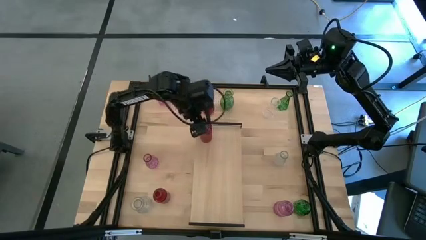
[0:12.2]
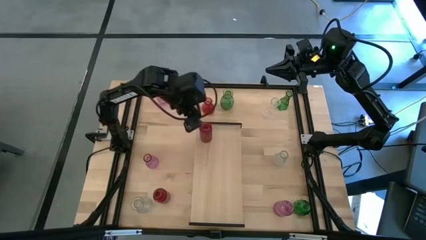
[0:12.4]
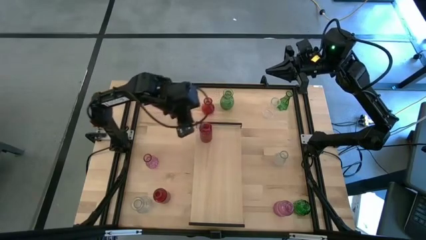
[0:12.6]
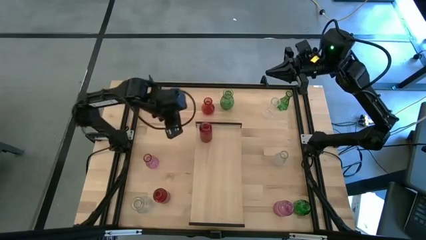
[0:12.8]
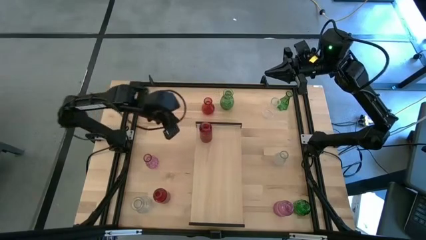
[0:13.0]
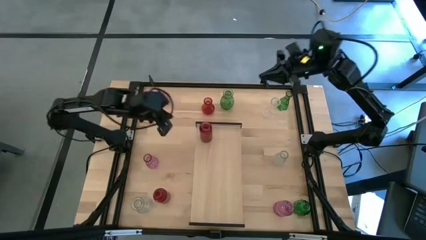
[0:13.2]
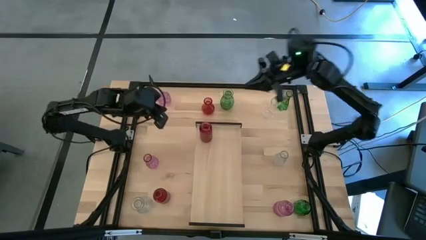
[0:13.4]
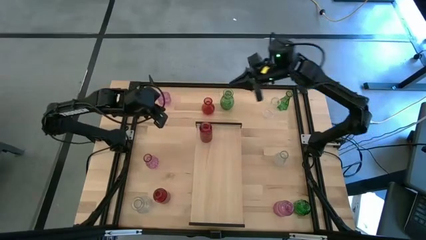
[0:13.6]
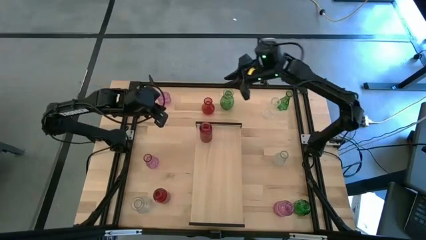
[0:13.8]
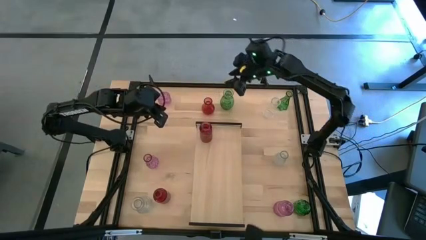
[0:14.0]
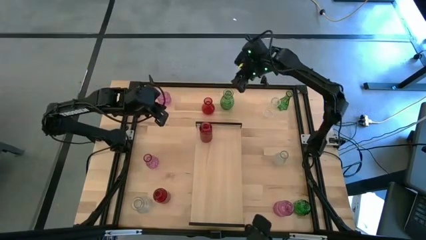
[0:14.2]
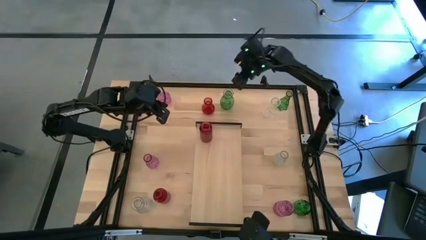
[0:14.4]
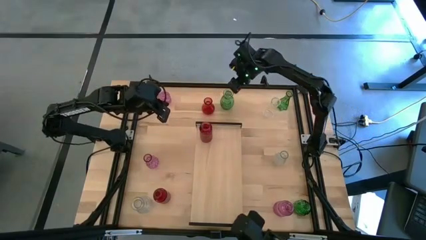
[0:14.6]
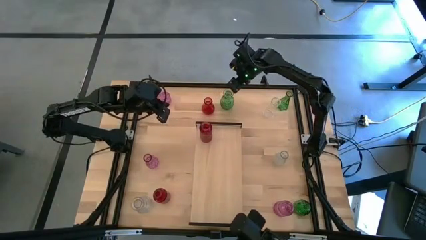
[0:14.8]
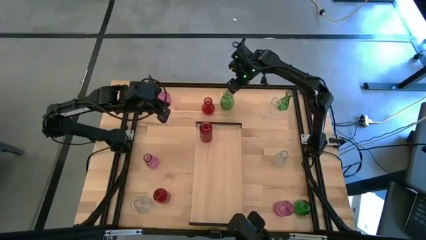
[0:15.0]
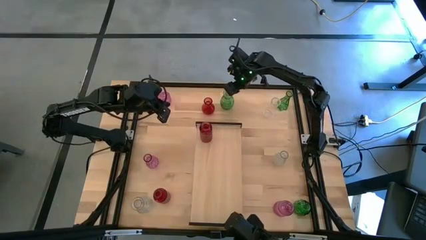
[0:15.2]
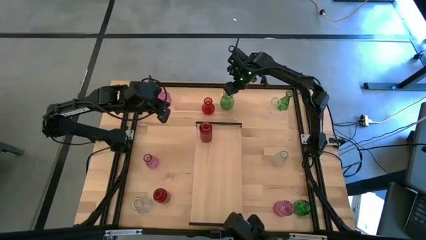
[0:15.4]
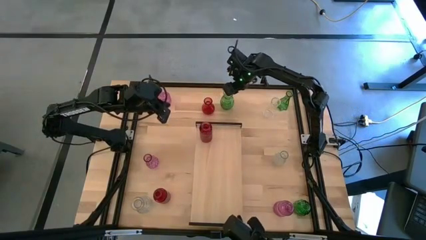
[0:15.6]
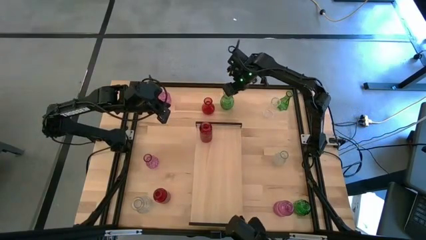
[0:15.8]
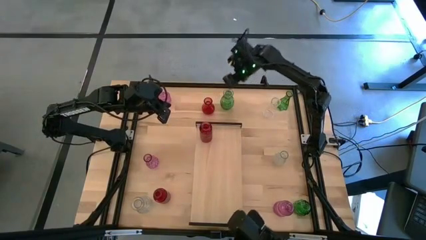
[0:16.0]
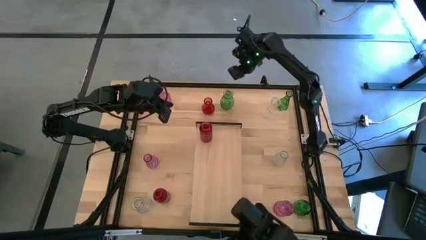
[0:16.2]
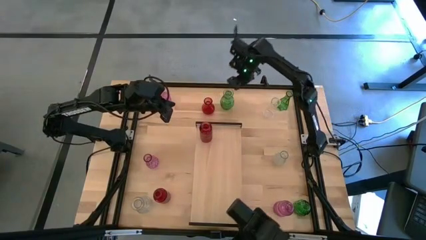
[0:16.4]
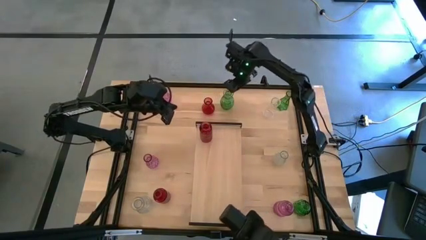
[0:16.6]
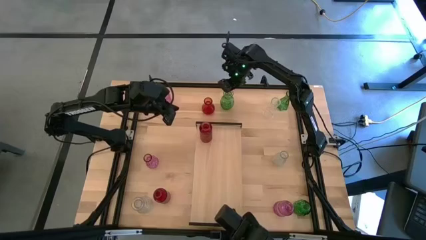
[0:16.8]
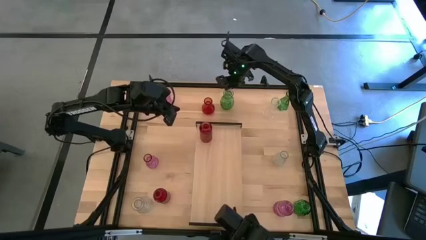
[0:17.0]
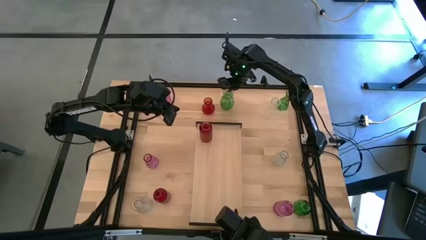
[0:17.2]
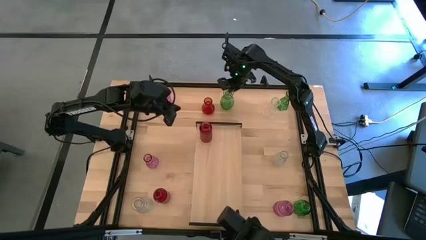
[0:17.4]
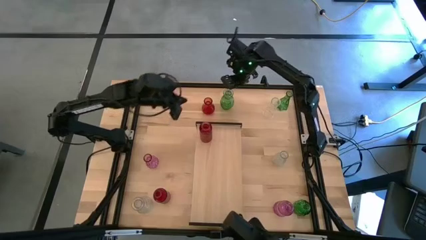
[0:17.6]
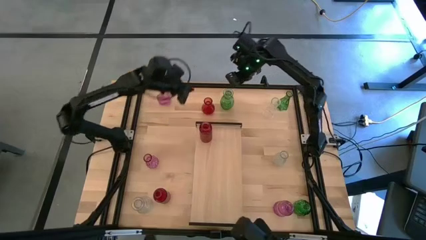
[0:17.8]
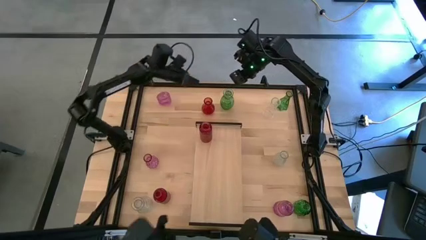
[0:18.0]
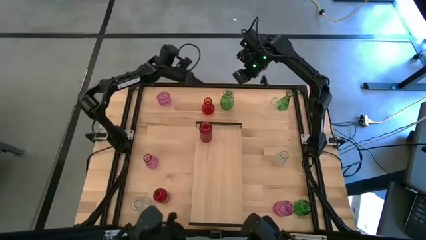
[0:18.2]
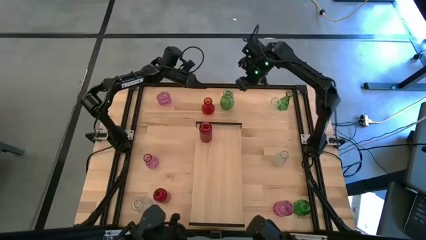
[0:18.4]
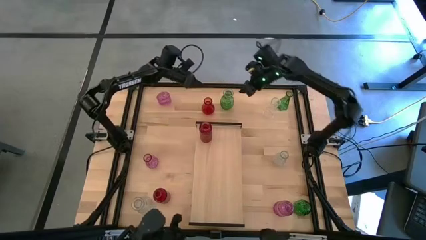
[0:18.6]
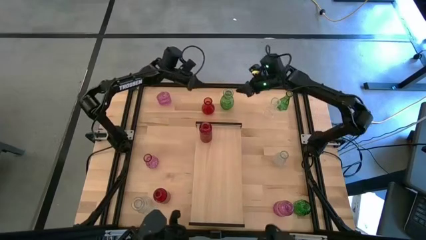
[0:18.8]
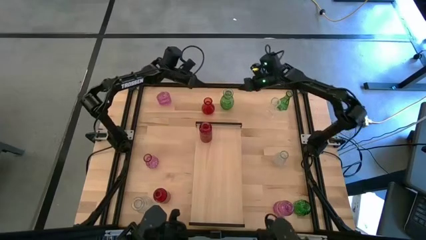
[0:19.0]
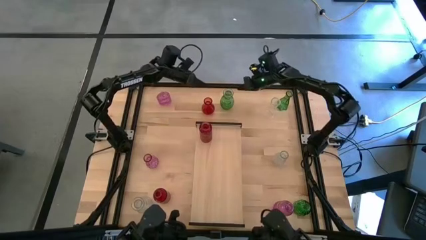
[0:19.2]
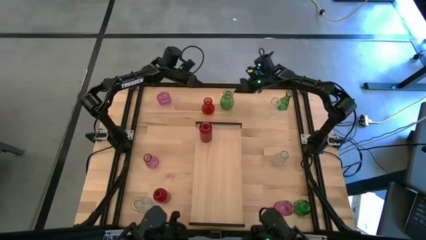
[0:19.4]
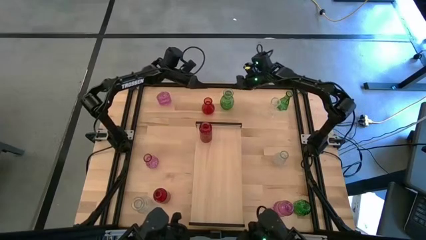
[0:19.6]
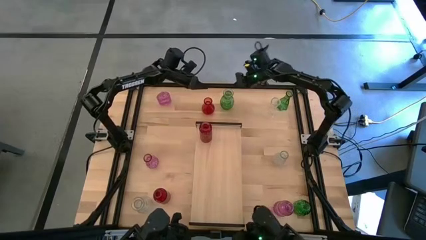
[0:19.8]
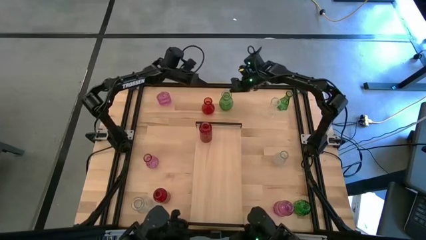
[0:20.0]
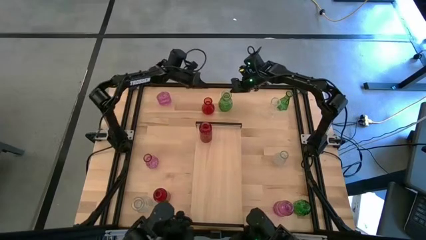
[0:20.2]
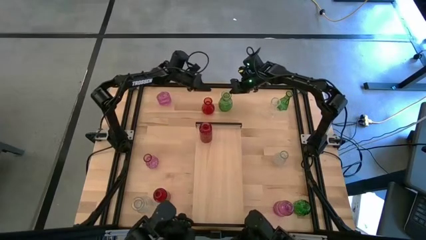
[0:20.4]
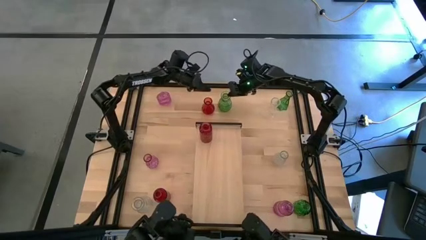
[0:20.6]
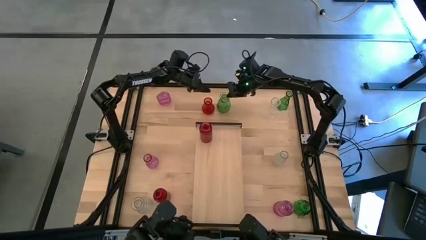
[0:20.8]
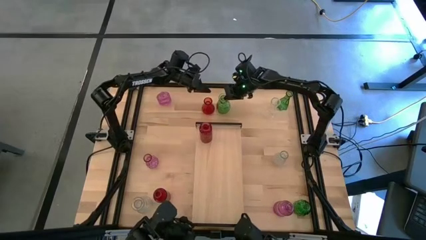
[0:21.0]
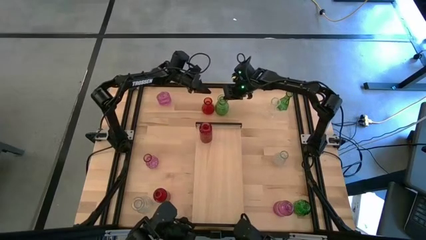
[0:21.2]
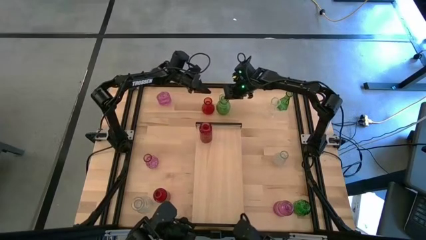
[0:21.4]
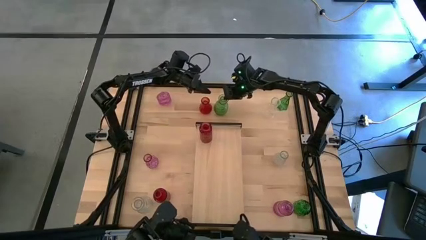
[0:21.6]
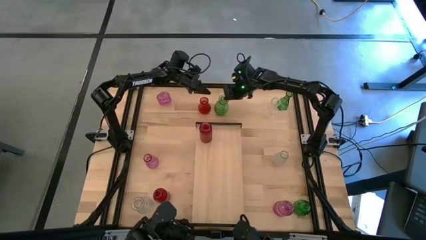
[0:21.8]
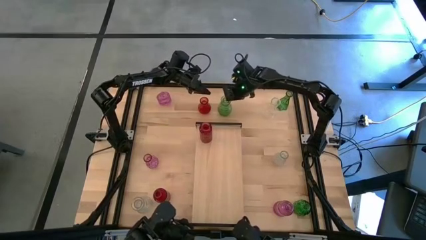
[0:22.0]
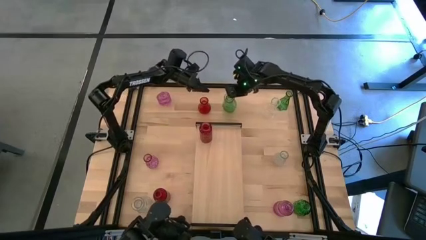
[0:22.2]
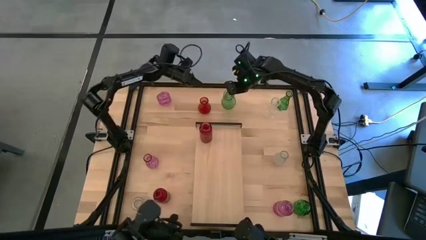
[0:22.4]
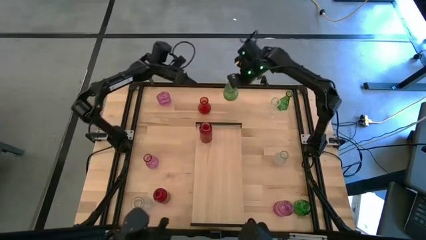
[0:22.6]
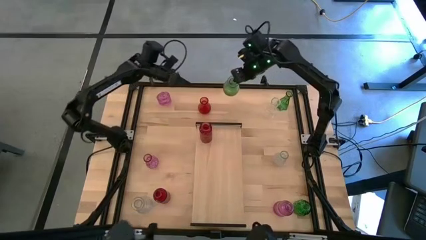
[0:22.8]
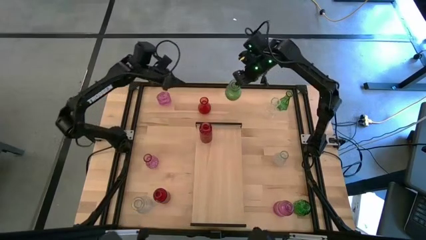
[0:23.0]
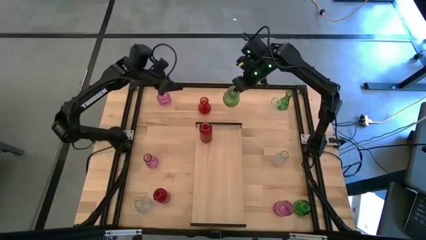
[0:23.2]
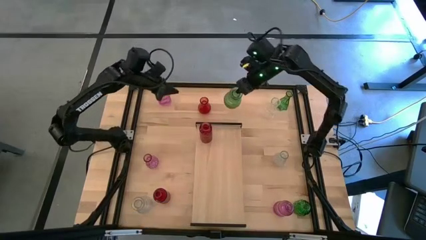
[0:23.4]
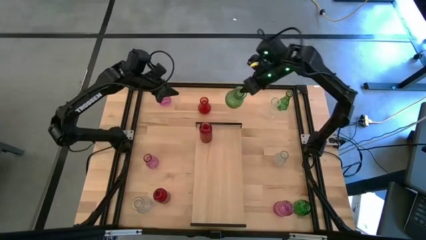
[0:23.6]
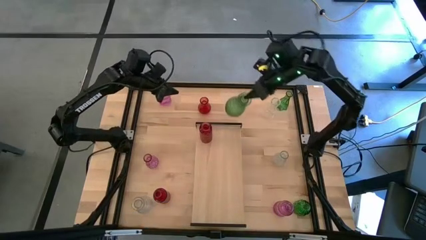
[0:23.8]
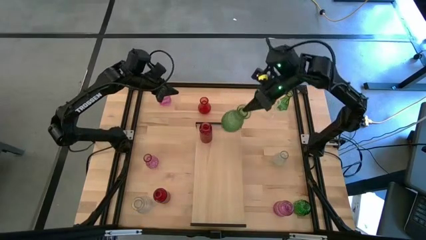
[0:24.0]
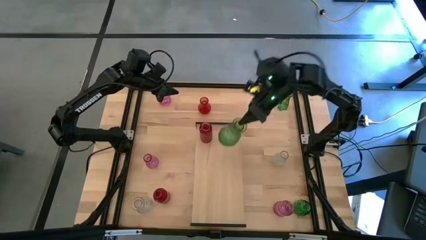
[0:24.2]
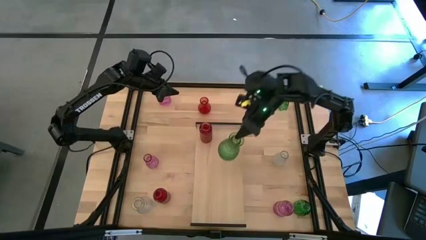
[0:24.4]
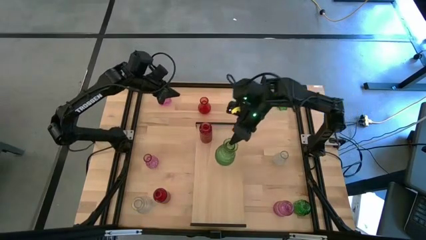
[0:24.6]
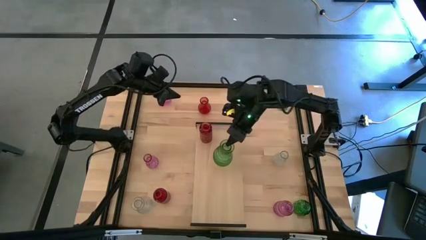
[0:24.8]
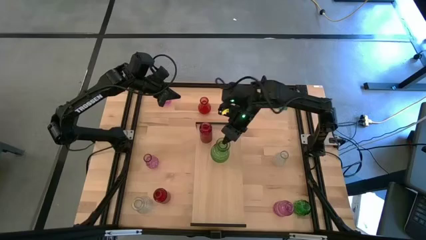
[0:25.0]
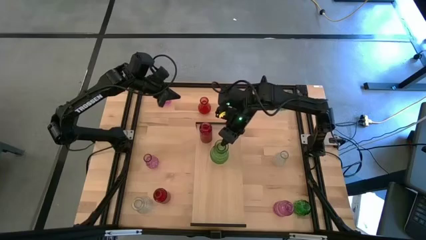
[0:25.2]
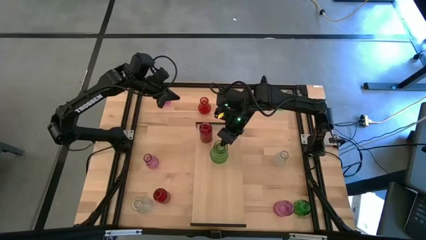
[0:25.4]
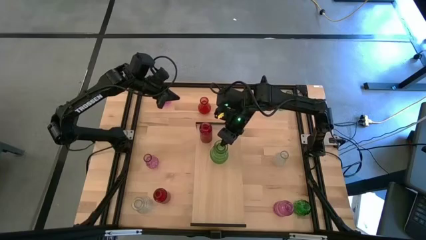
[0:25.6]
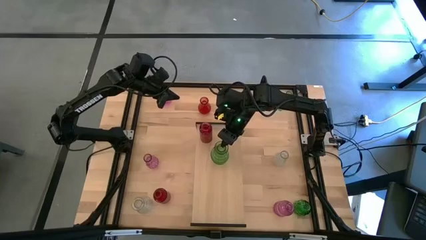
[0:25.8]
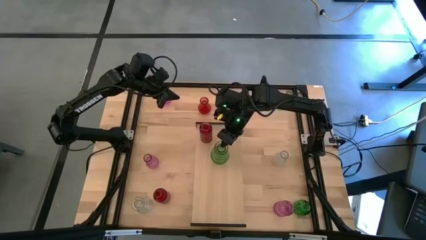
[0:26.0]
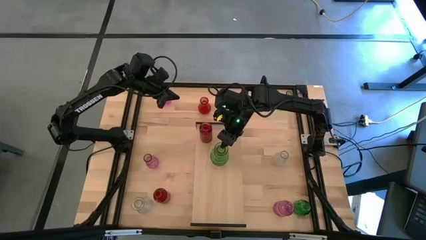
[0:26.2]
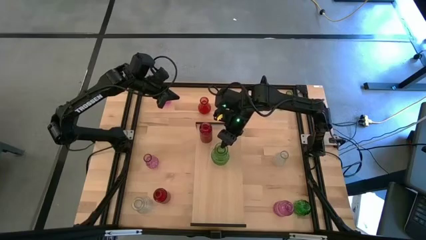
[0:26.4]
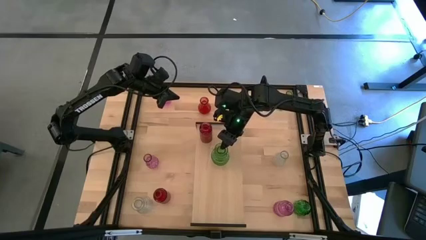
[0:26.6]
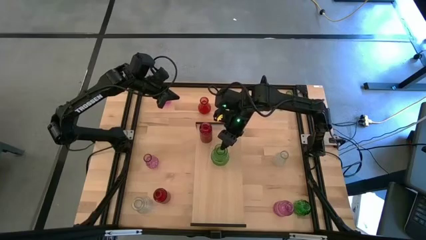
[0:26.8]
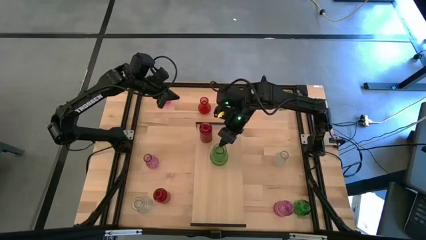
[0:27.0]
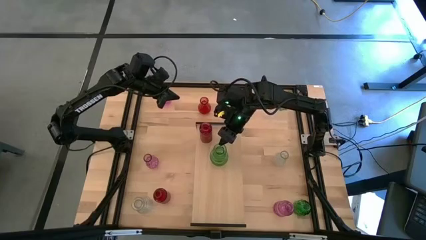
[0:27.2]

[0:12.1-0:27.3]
Task: sort vases onto shelf
Put the top left green vase on the shelf
